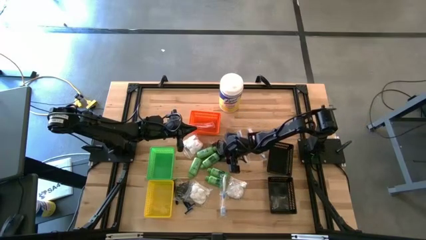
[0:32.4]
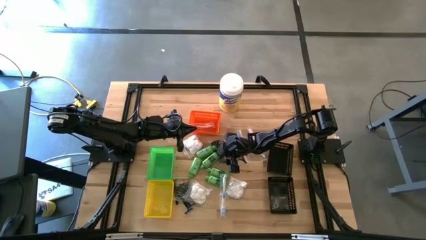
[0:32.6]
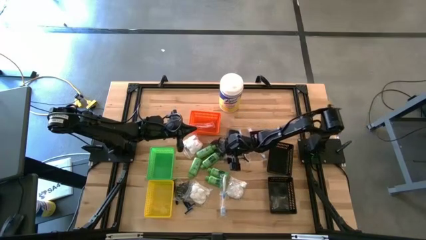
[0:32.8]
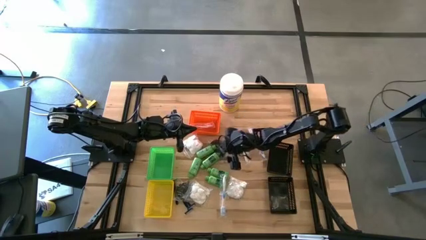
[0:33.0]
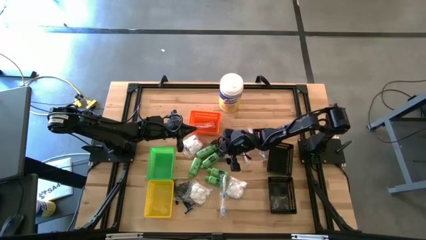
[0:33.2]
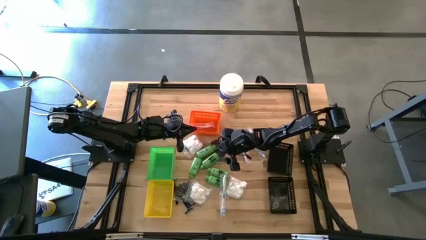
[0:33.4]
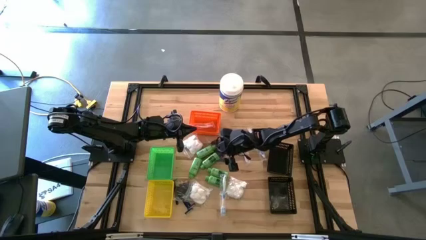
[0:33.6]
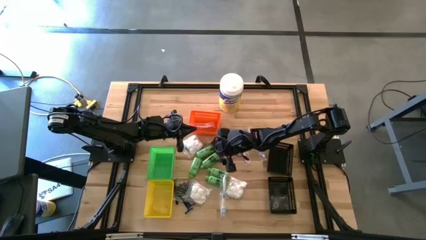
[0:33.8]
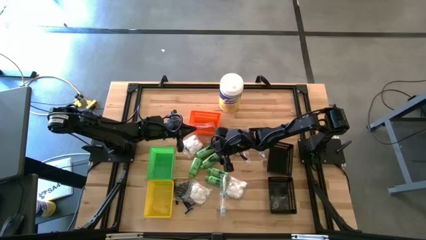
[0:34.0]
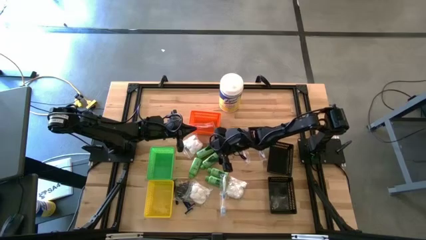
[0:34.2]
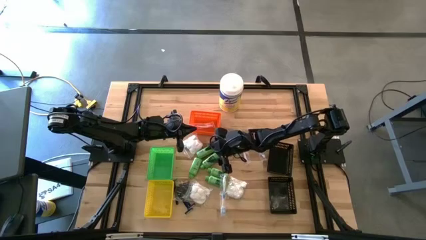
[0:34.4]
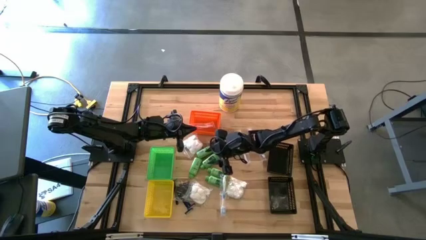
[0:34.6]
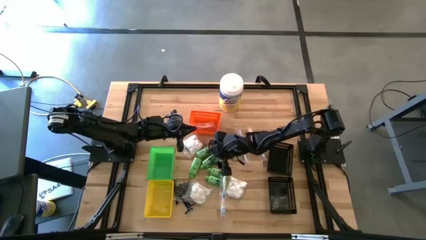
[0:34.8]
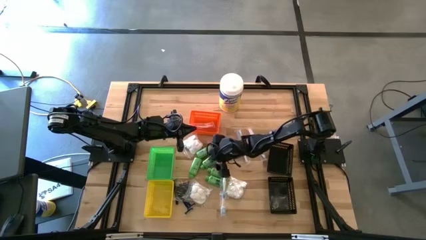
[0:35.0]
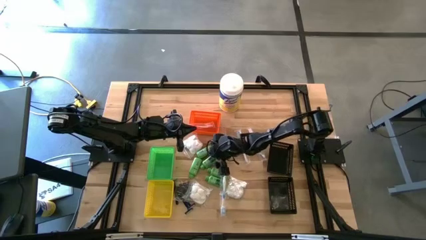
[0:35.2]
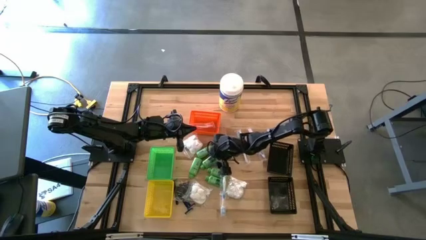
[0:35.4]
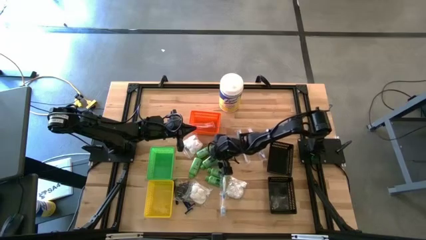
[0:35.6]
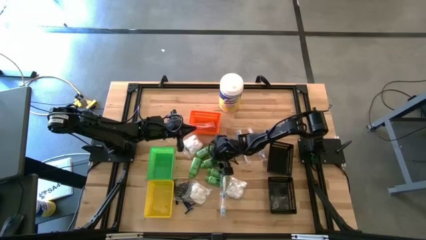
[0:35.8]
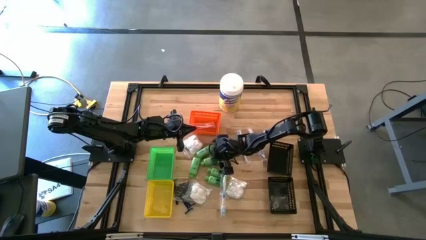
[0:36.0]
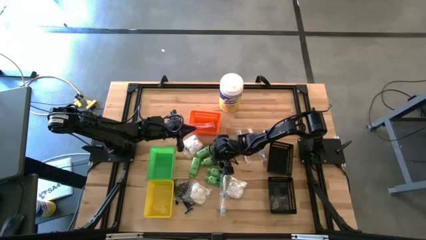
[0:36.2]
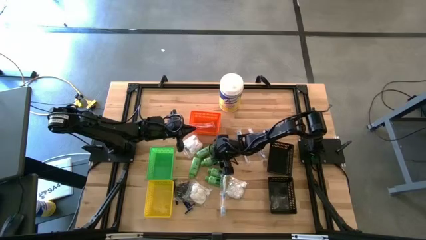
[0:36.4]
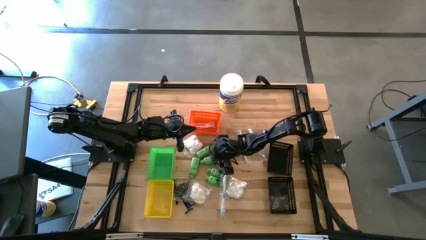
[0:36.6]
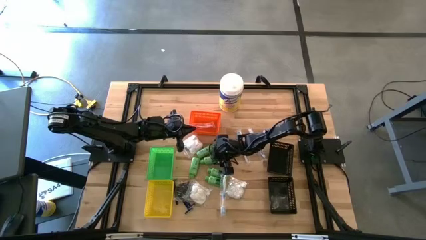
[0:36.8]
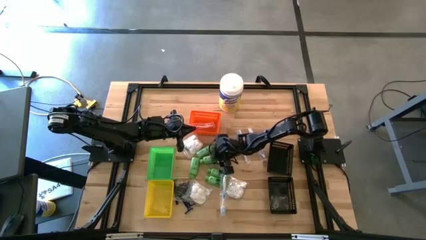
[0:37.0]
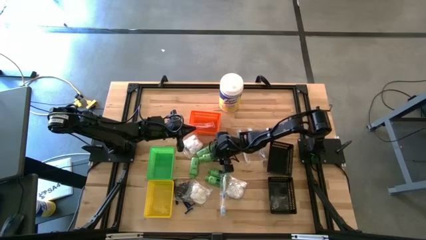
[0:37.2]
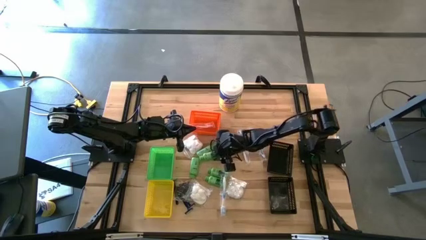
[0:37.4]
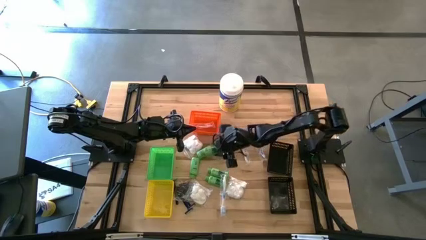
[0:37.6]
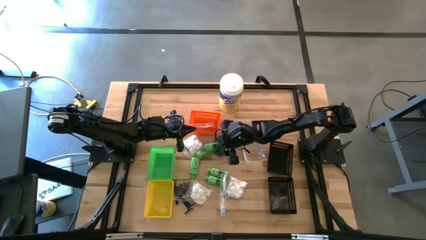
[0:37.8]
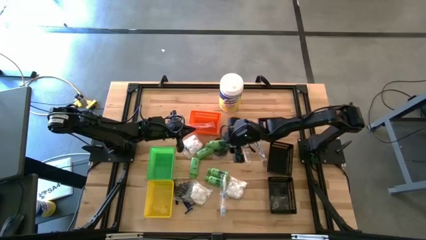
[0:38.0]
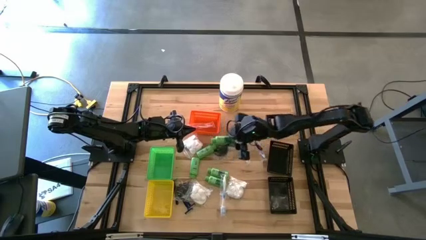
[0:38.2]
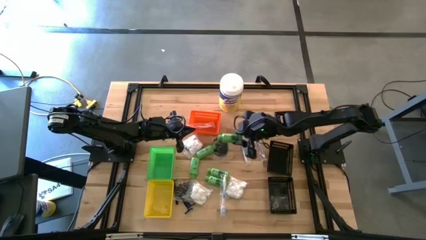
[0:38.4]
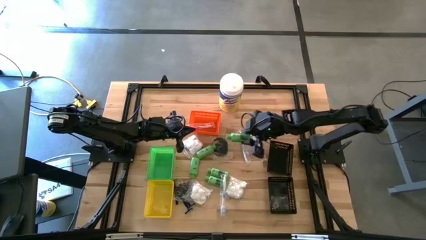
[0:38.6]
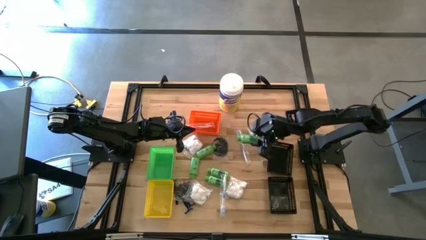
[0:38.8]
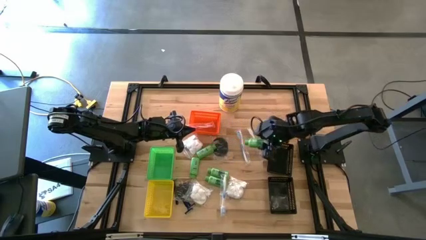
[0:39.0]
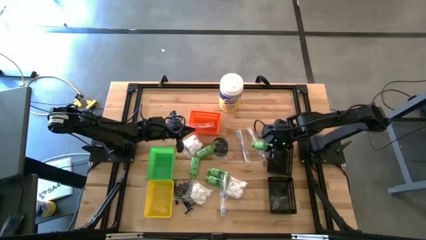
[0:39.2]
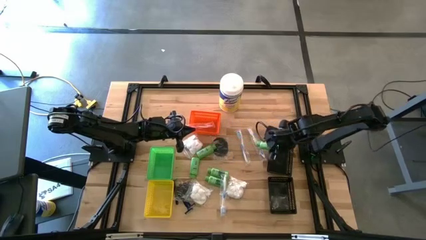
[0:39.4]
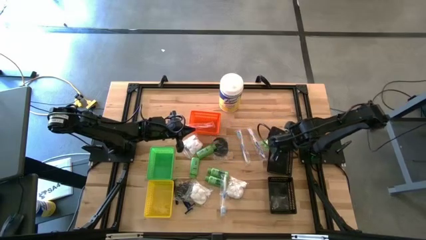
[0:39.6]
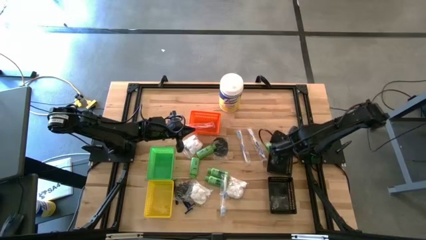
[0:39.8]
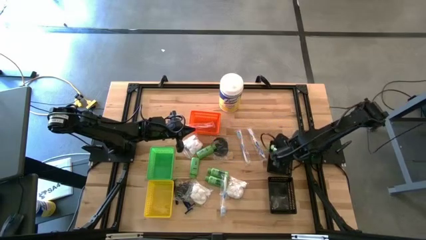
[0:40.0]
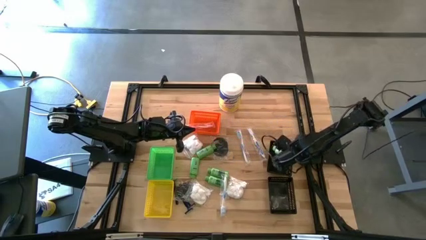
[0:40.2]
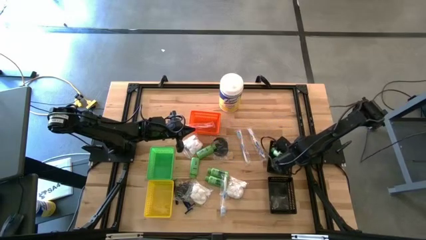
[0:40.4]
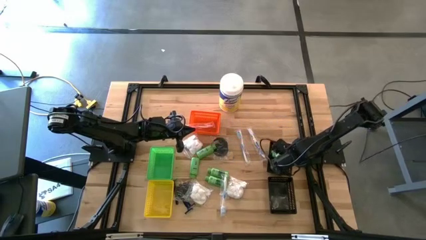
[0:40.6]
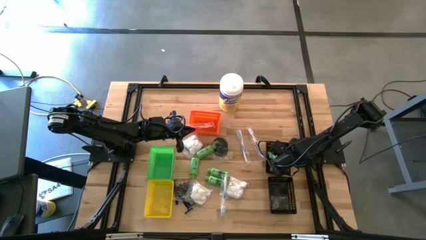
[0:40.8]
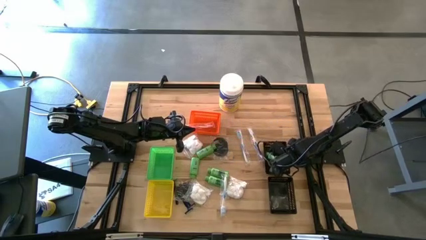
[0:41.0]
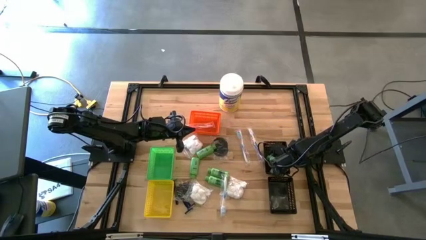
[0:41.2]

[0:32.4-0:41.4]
Task: Pick & Place Travel size toiletries
Put the green shampoo into the top black bin

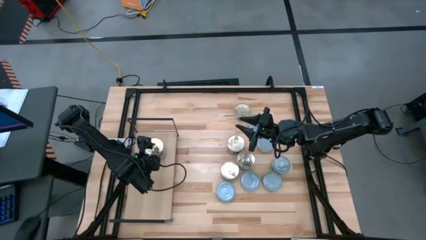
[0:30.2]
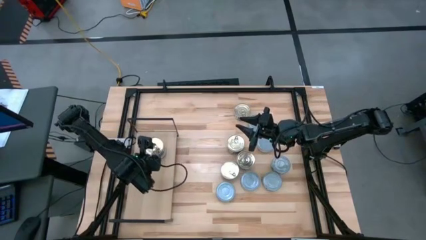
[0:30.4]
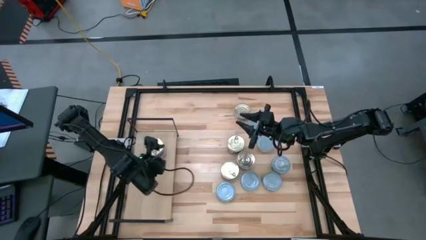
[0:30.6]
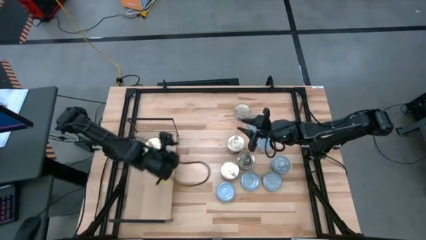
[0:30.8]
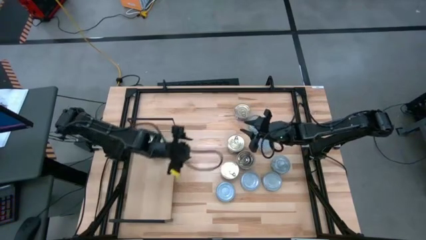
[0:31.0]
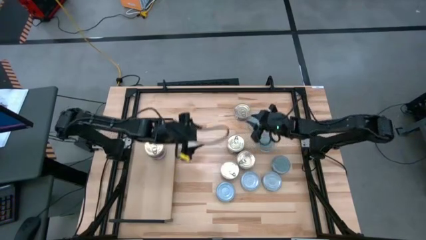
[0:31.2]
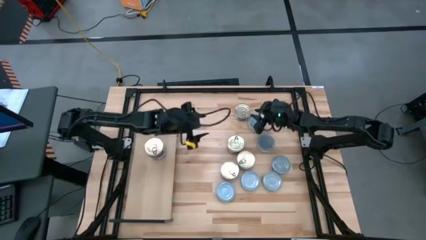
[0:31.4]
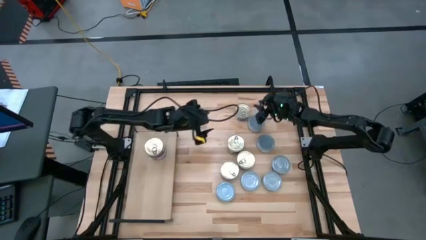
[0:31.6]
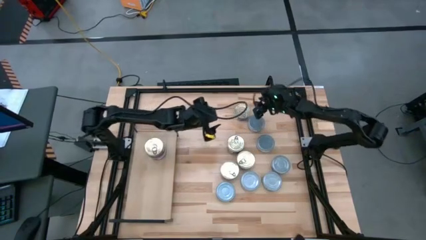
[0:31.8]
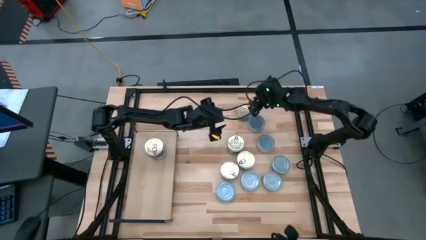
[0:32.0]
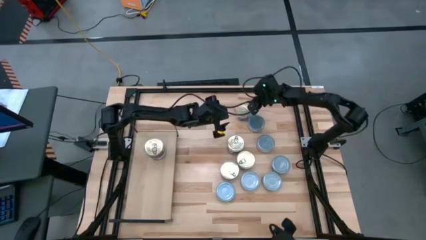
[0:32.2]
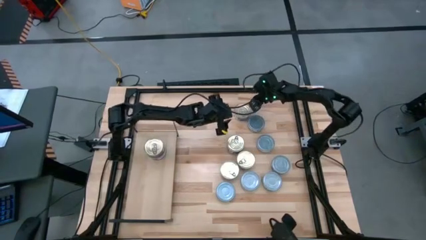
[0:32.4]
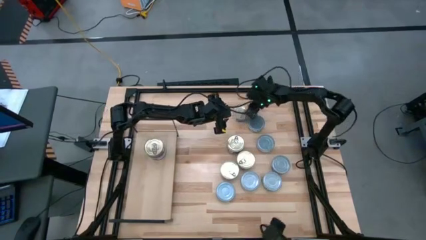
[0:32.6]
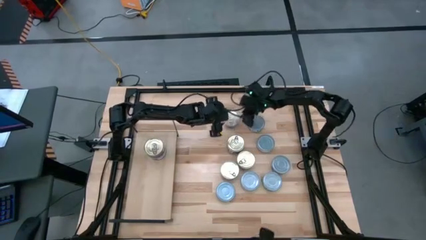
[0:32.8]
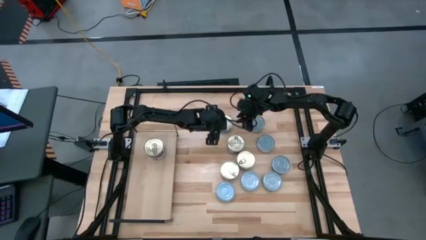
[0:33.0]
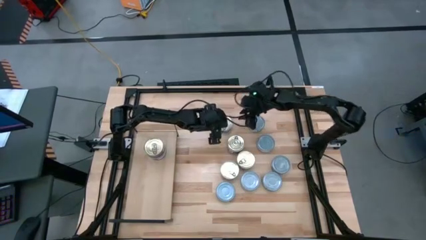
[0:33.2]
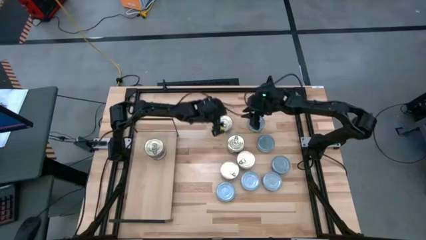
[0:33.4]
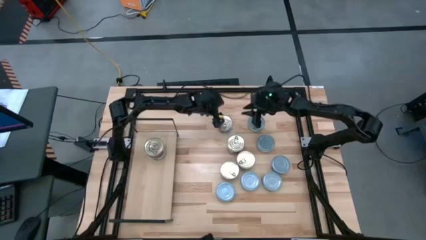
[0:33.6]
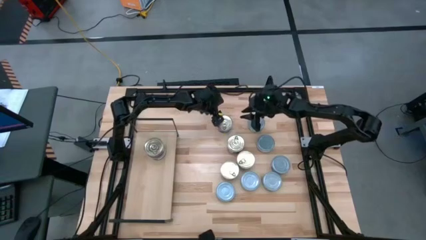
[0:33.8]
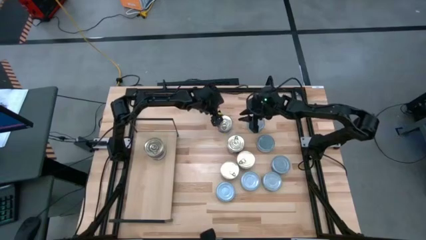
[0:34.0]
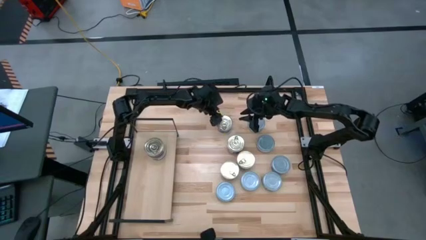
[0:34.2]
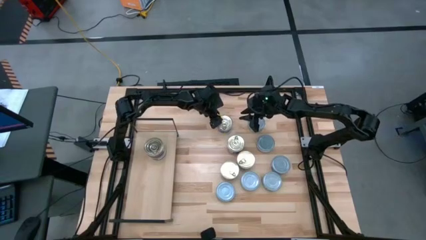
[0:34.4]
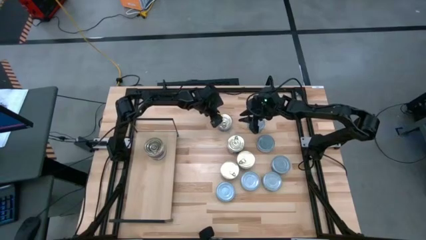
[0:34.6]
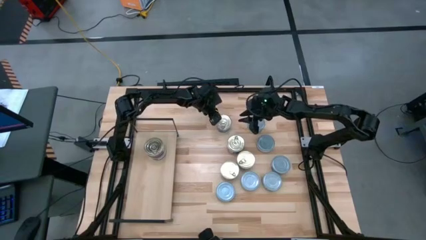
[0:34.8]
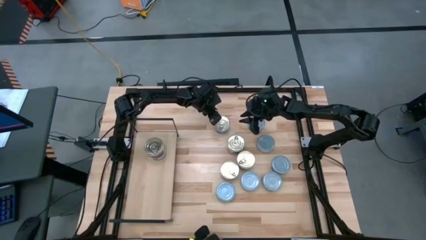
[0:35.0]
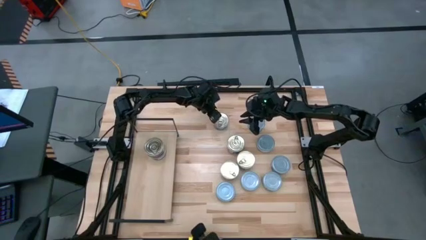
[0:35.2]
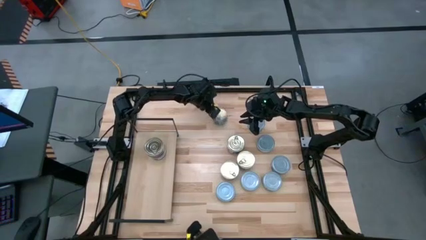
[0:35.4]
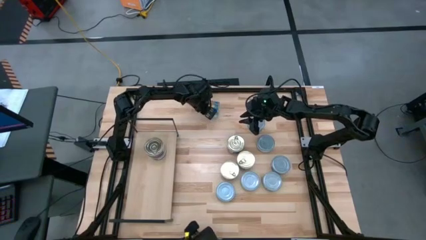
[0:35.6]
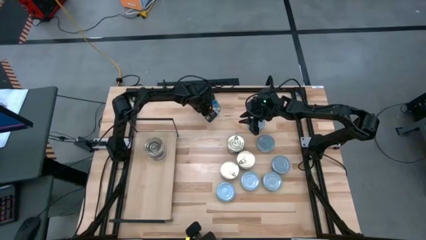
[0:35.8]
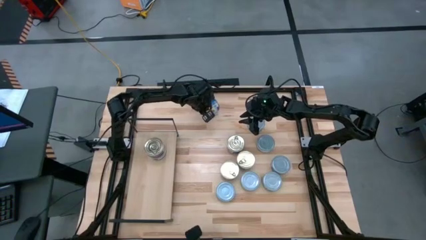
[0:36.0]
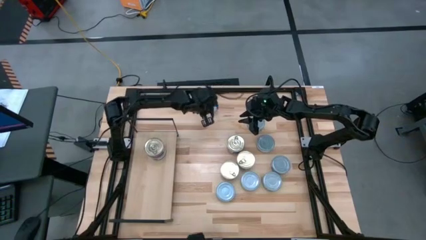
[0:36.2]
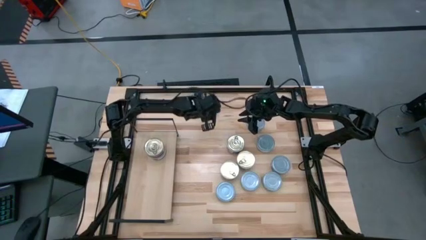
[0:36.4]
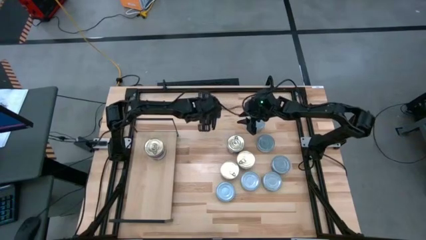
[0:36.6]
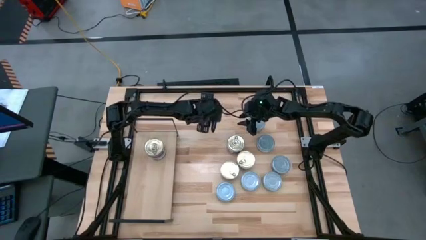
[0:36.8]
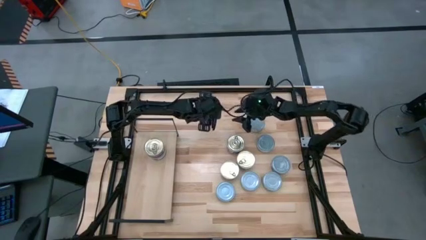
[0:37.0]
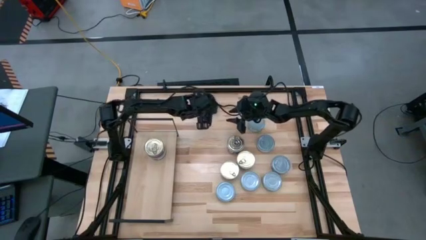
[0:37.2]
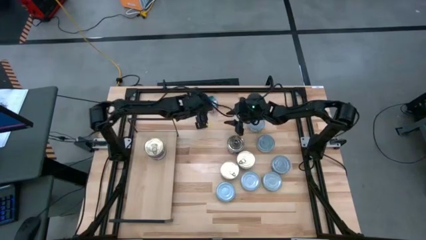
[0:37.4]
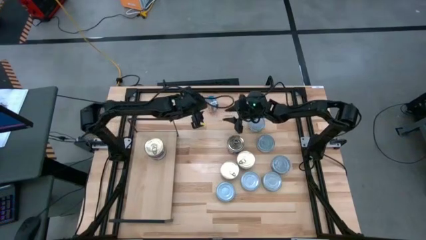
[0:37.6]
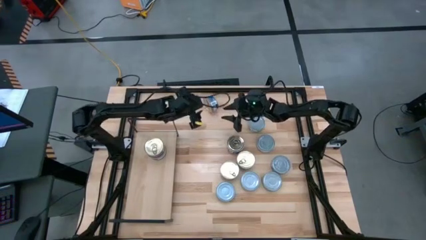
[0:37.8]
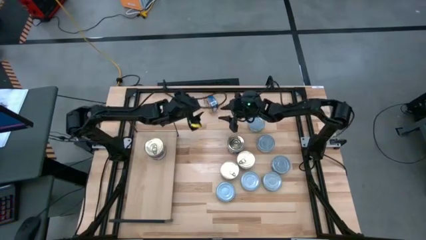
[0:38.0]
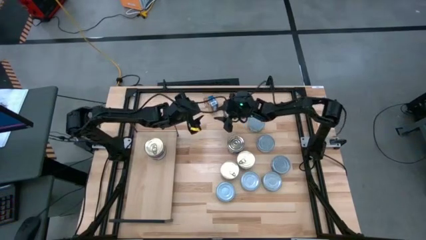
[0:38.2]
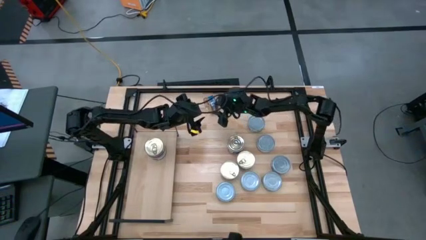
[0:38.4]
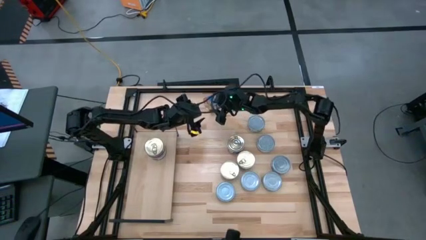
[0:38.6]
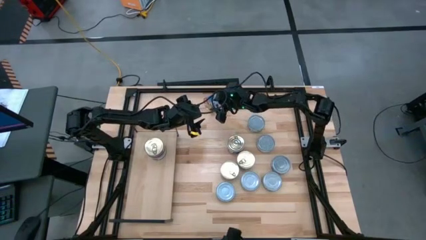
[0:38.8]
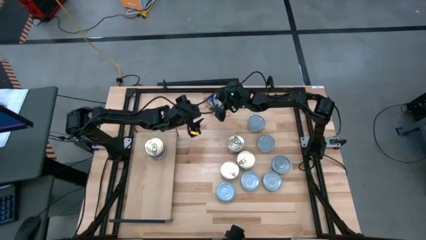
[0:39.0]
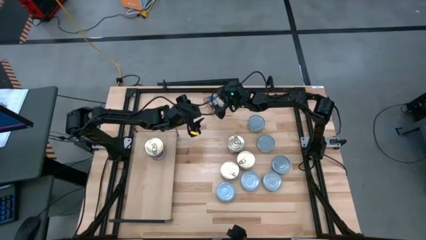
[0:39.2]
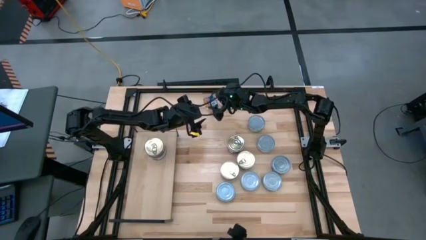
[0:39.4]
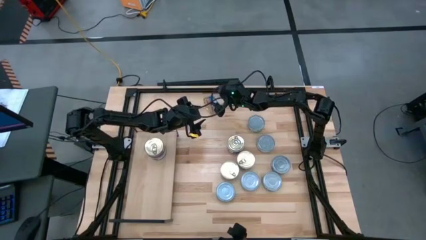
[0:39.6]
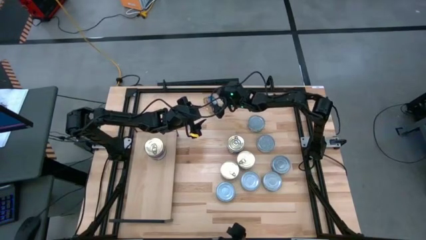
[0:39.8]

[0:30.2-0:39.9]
Task: Stack canned seafood by type on shelf
Stack the blue and pink tuna can on the blue and pink tuna can on the shelf
